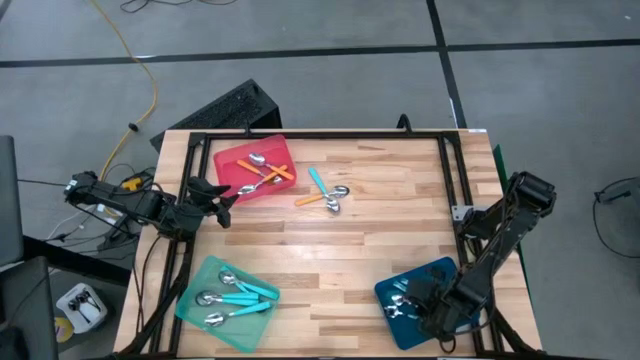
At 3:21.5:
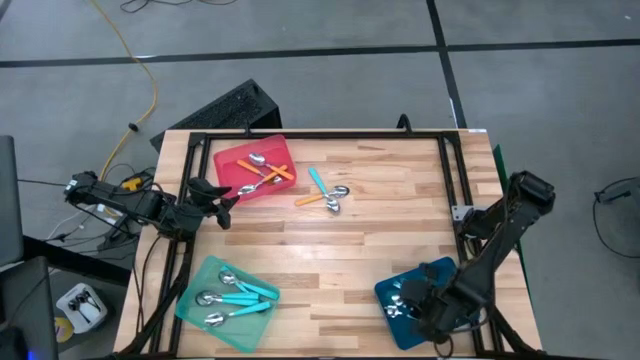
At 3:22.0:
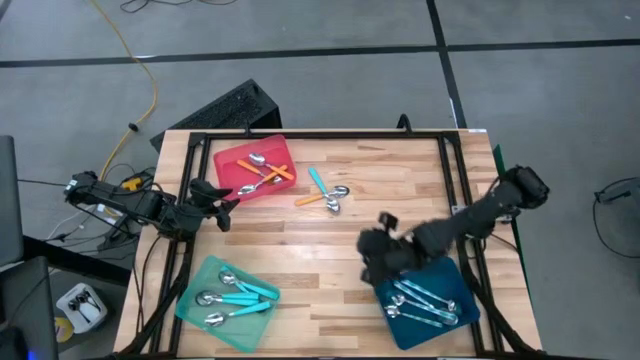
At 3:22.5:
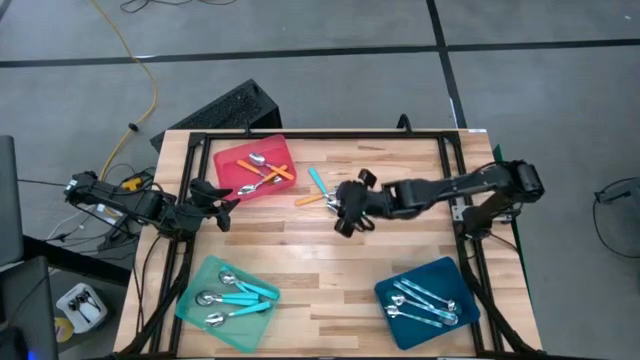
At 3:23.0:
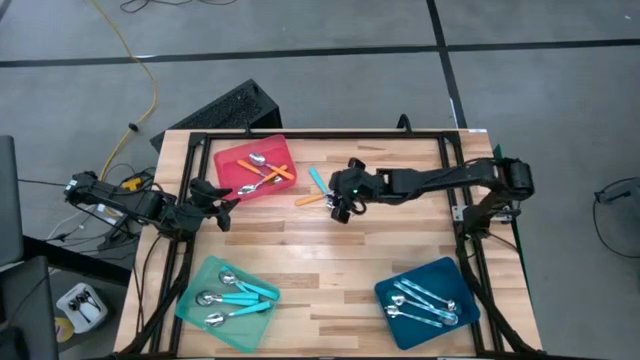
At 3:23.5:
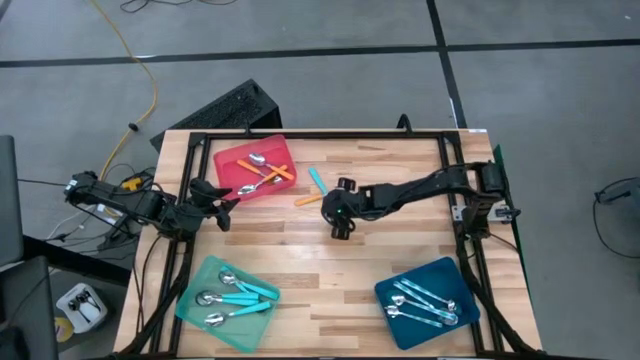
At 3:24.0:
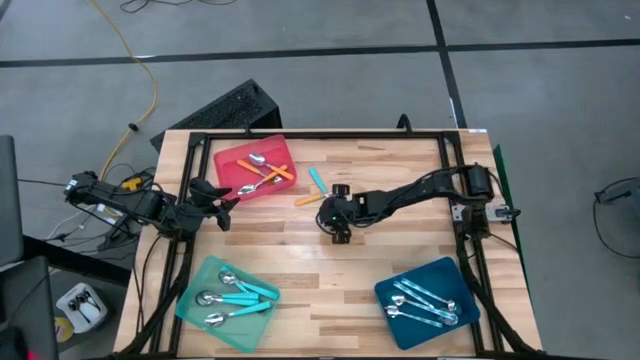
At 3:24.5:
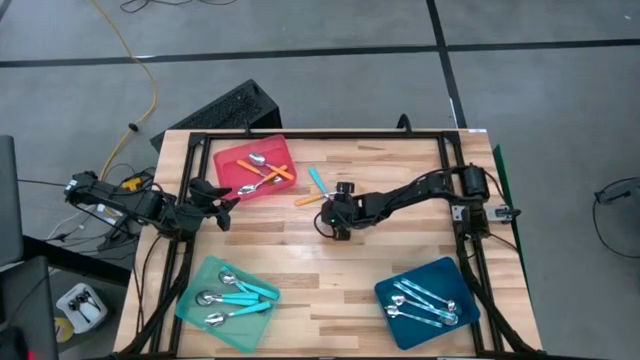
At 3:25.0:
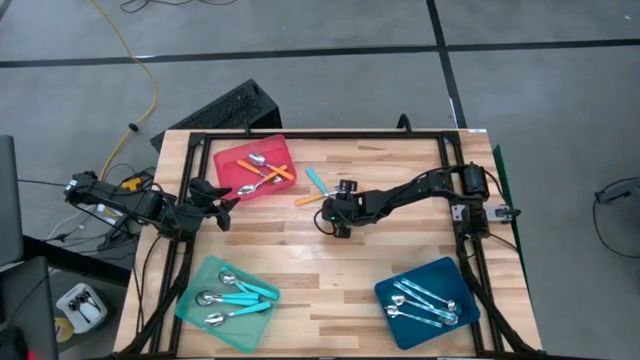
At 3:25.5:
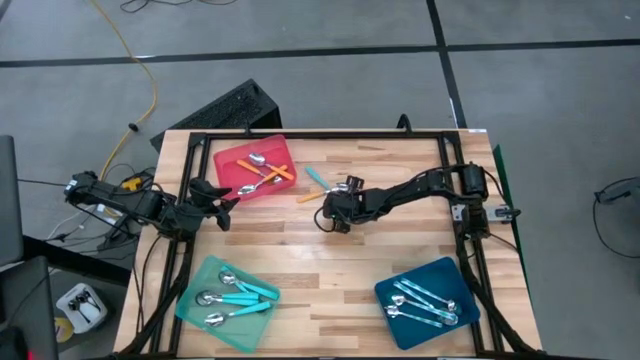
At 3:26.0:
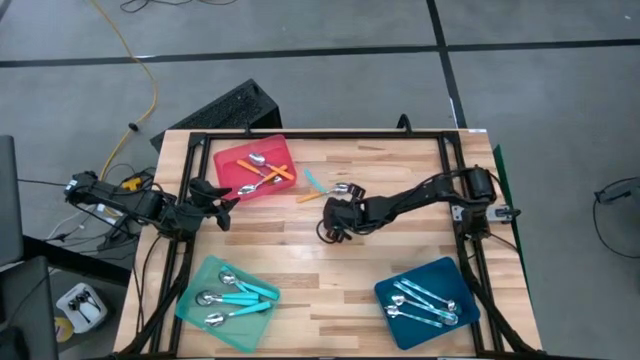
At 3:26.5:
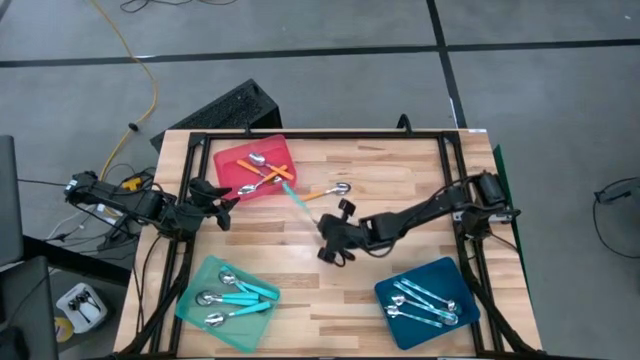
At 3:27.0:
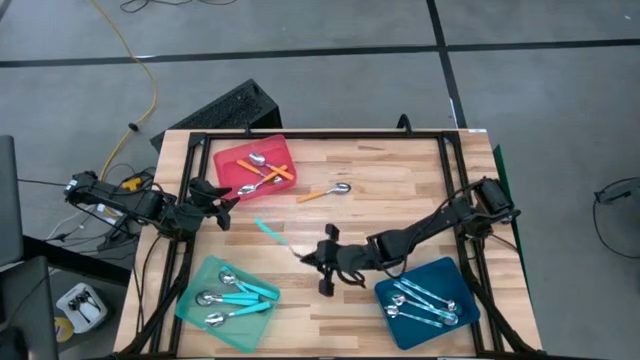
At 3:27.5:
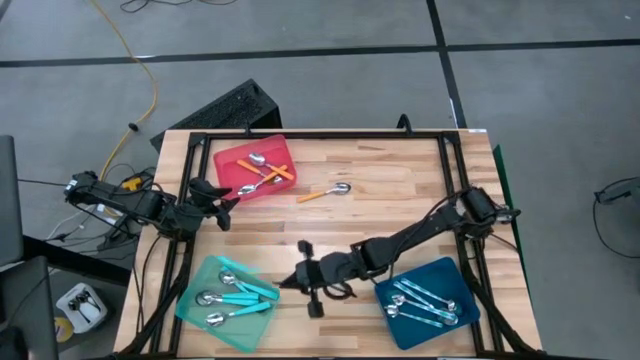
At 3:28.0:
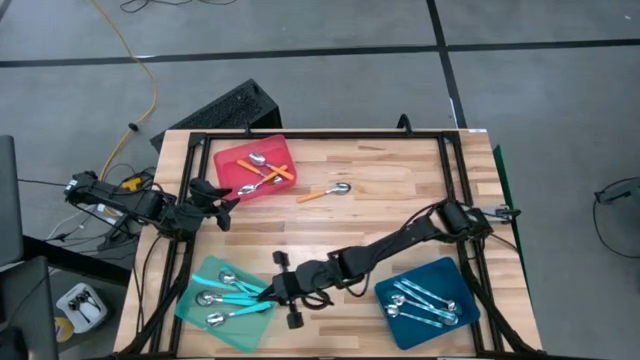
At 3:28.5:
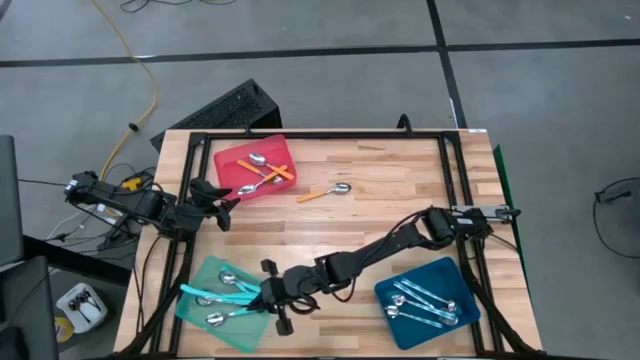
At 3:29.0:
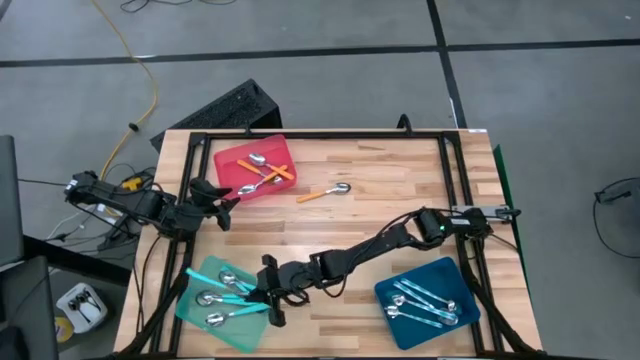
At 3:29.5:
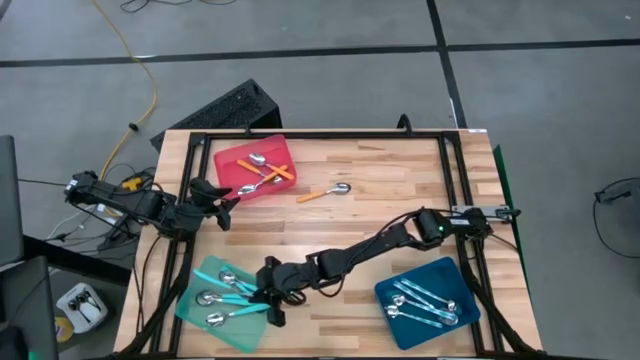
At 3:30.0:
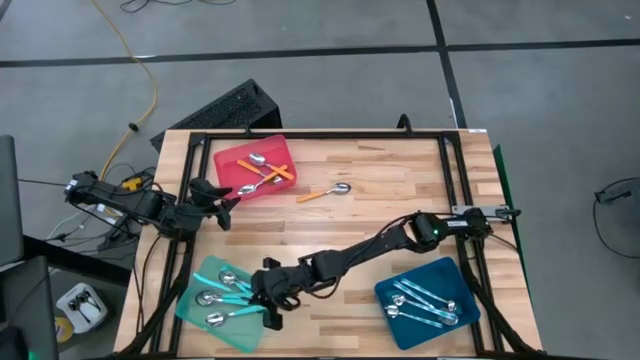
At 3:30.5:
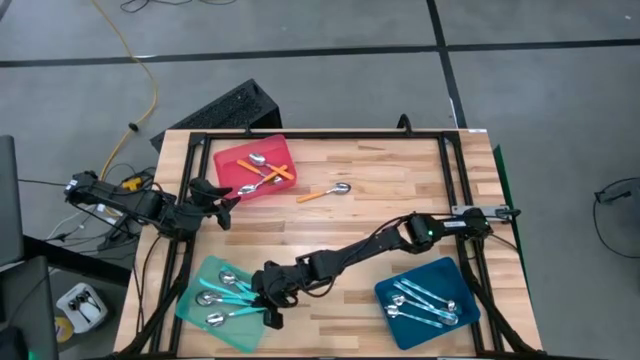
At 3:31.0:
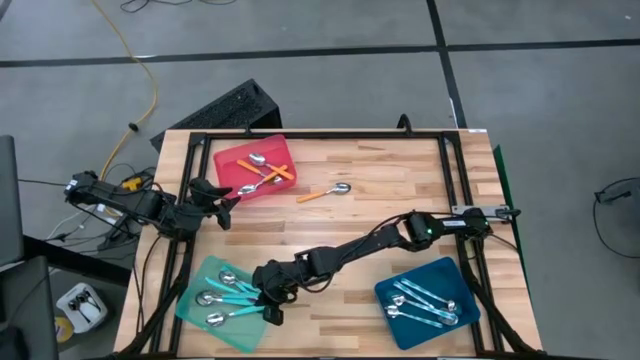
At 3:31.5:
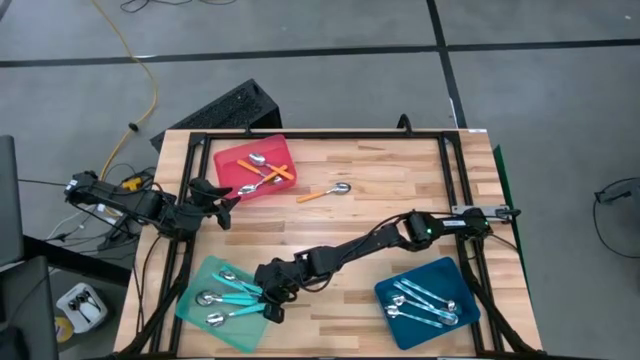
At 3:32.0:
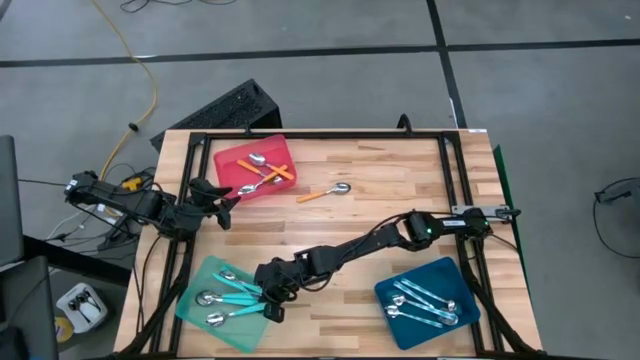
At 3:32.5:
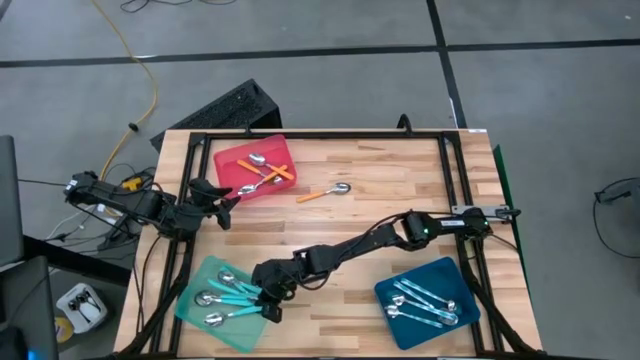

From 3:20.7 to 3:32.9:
Task: Sort silverware by color (type)
Put the blue spoon into the light blue bin

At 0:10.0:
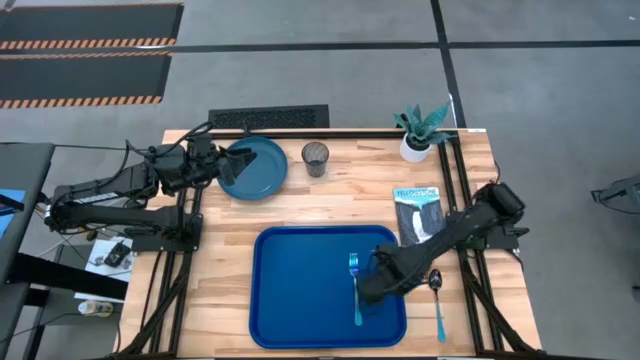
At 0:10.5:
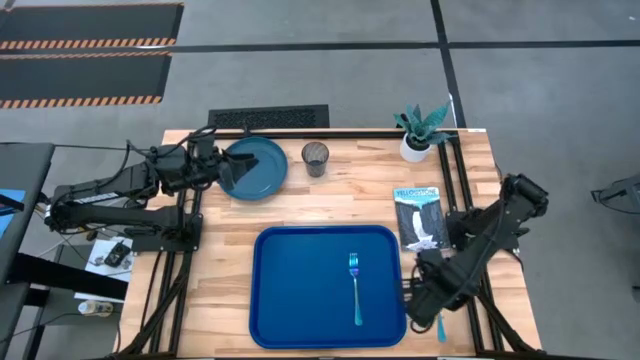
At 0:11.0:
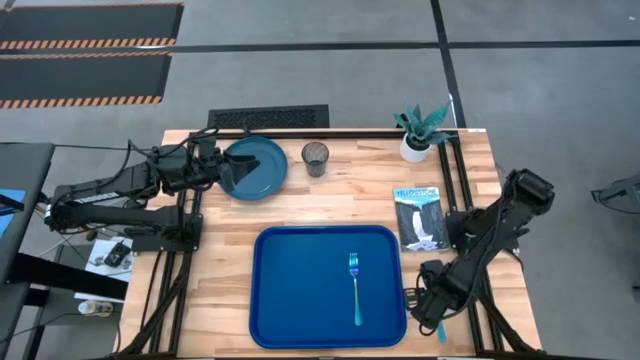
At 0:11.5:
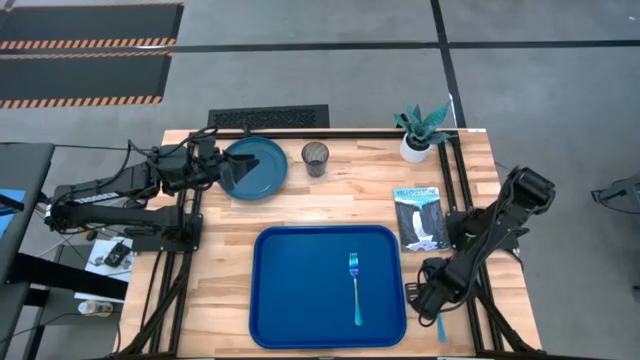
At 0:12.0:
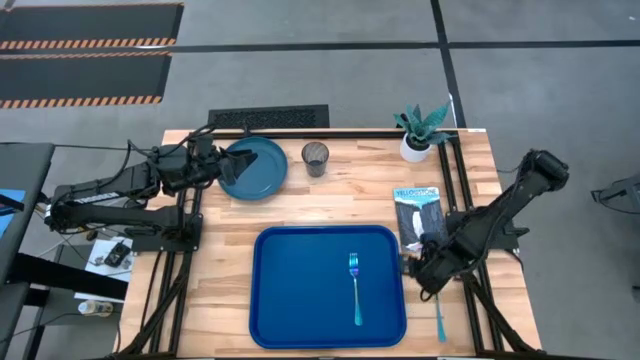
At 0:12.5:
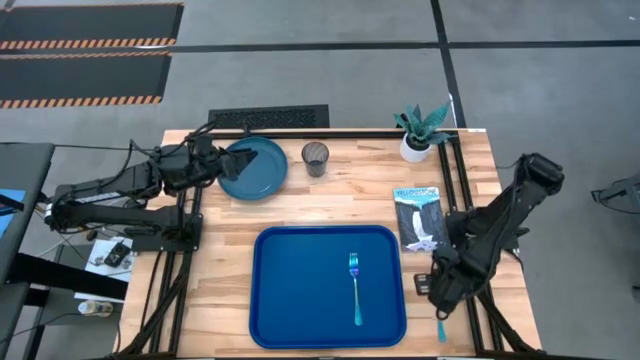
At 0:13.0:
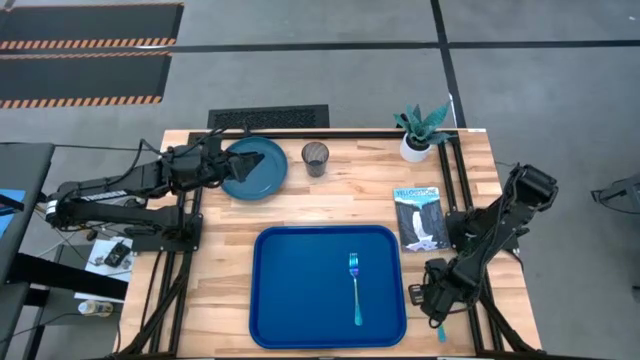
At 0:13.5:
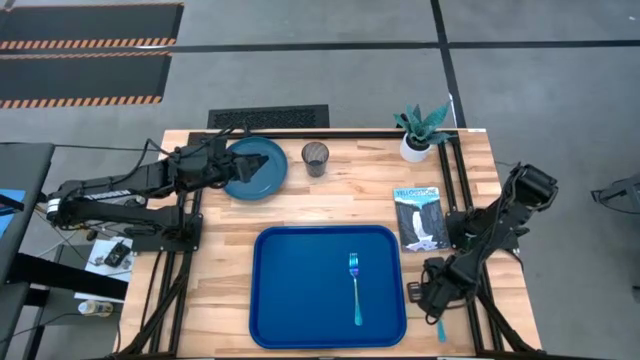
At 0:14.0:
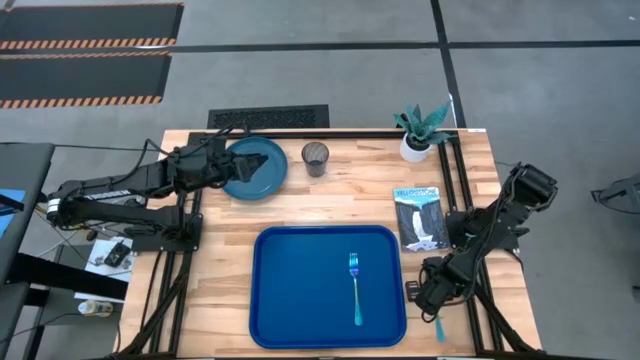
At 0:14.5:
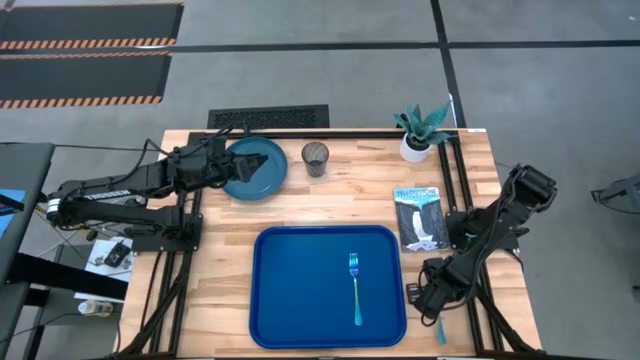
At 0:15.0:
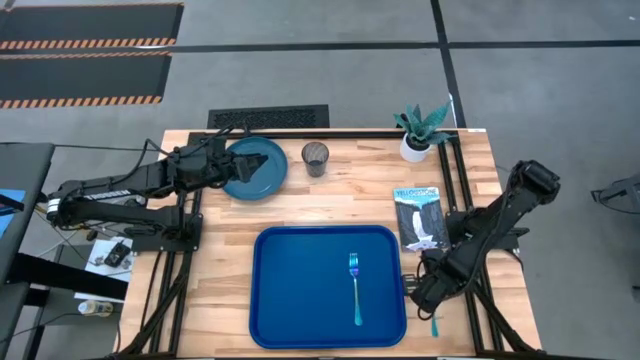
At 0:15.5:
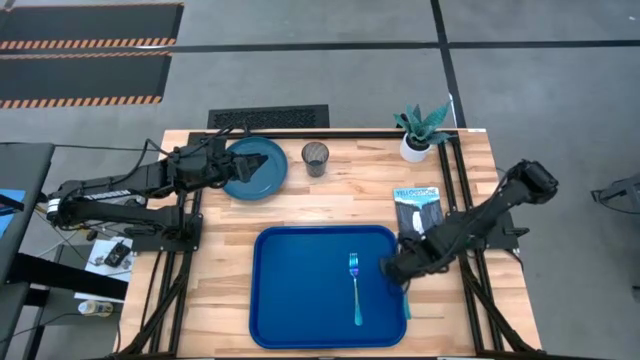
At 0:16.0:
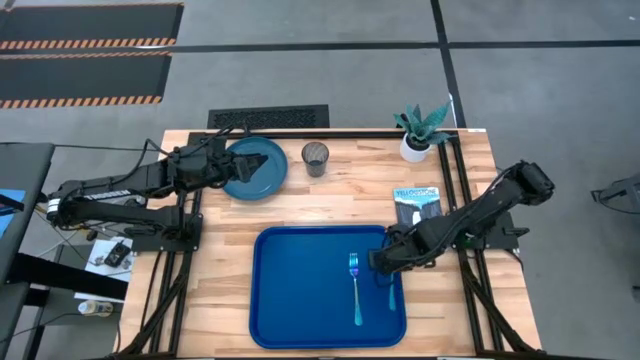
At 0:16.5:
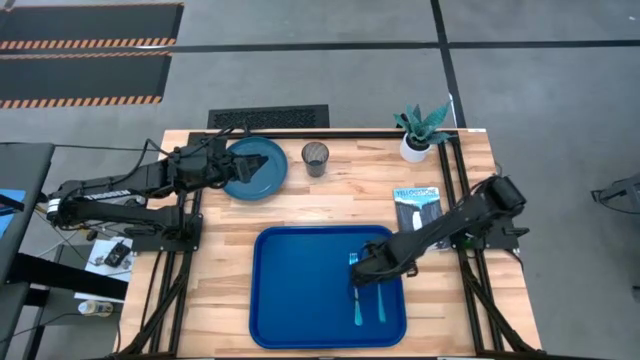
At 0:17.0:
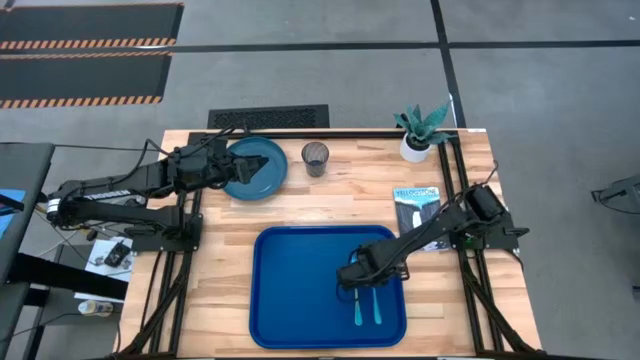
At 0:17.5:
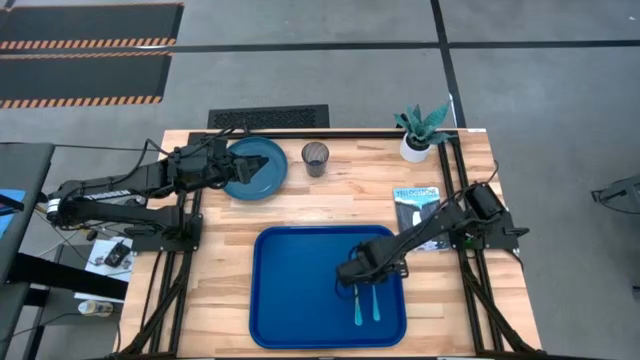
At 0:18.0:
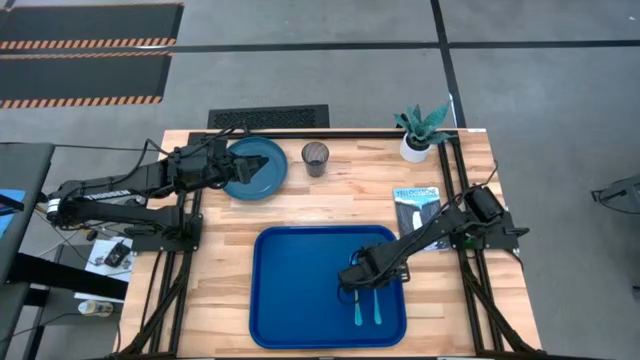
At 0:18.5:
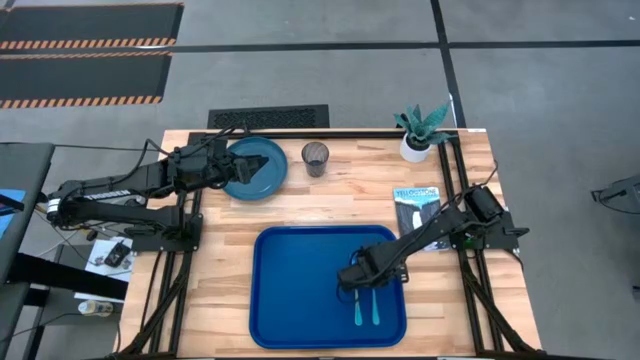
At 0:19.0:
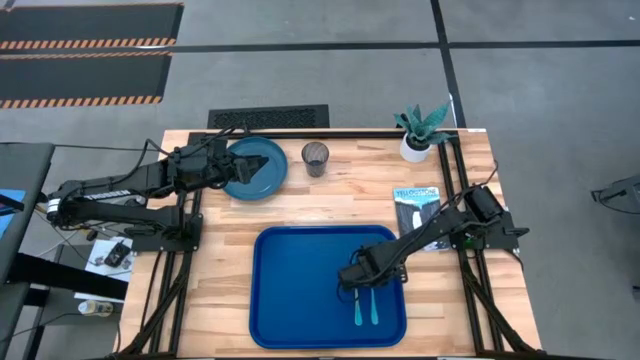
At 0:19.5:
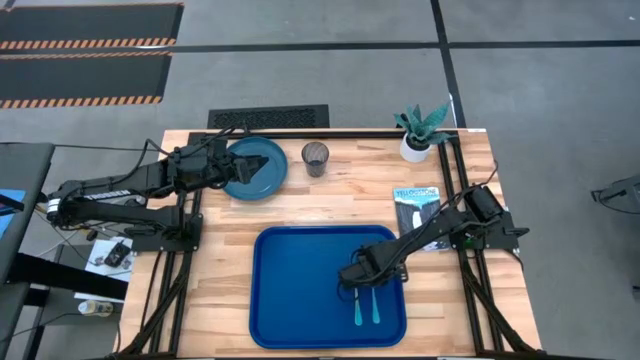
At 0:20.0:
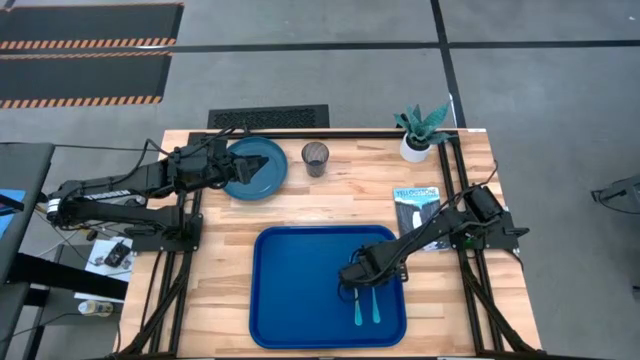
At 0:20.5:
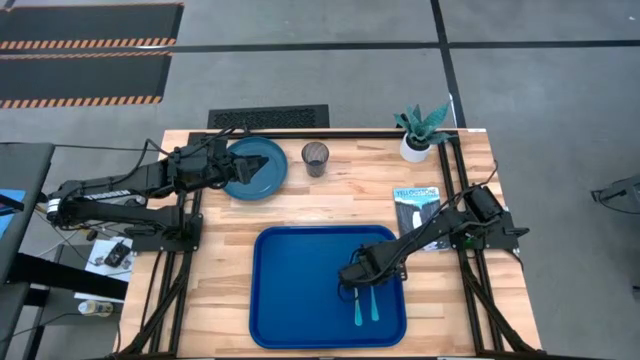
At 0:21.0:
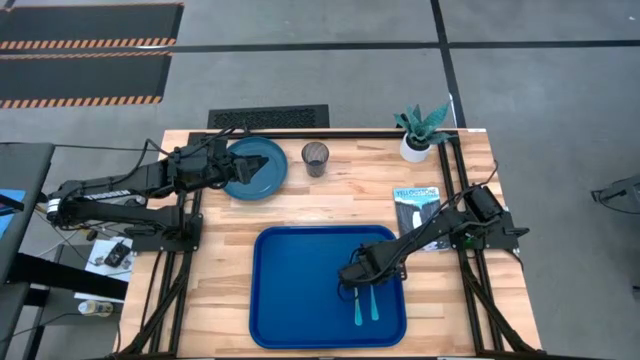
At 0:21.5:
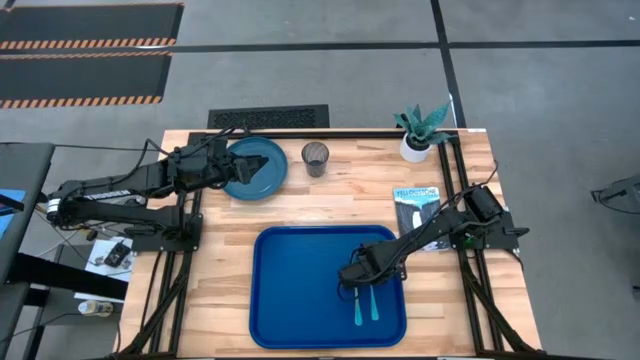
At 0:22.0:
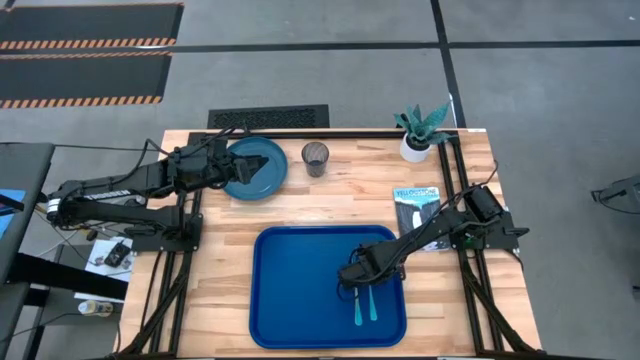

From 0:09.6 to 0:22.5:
Task: Pick and place plate/cup/fork/spoon on tray
Put the blue spoon on the blue tray to the right of the purple fork
